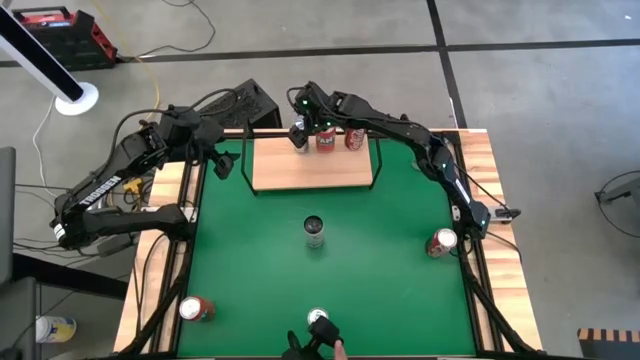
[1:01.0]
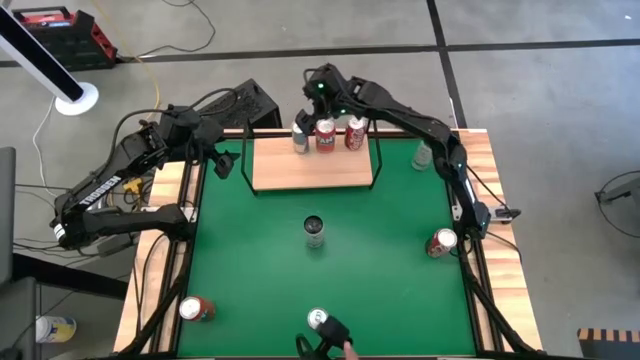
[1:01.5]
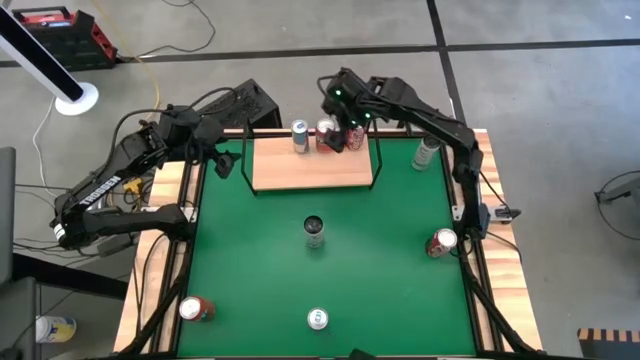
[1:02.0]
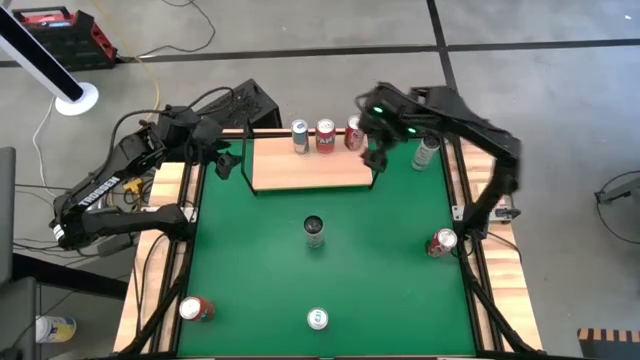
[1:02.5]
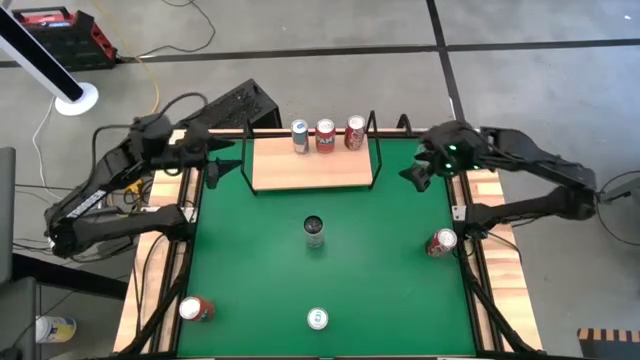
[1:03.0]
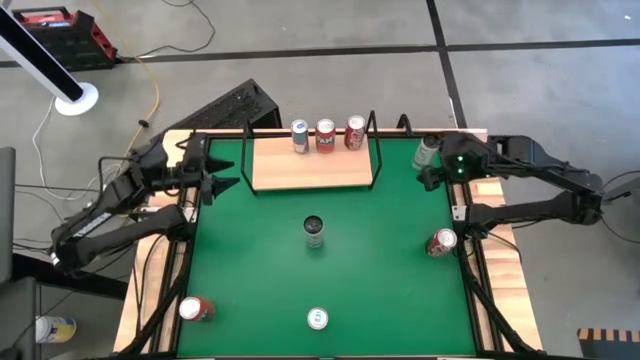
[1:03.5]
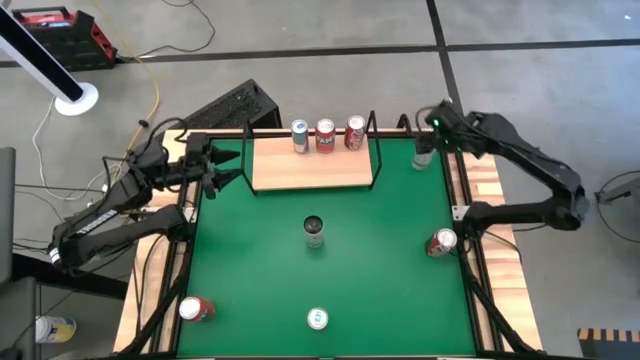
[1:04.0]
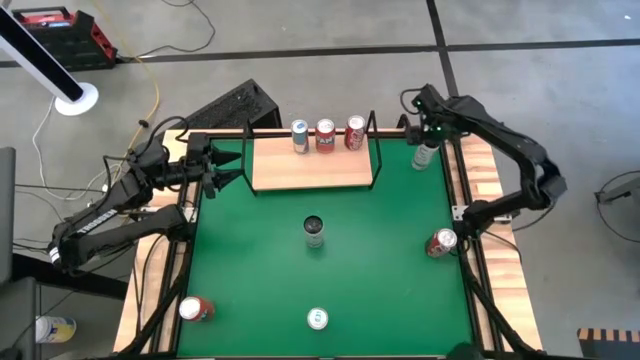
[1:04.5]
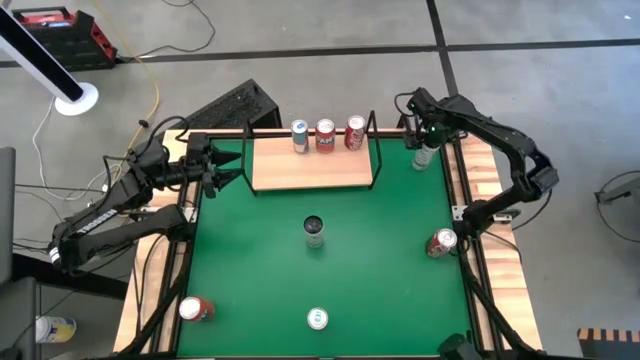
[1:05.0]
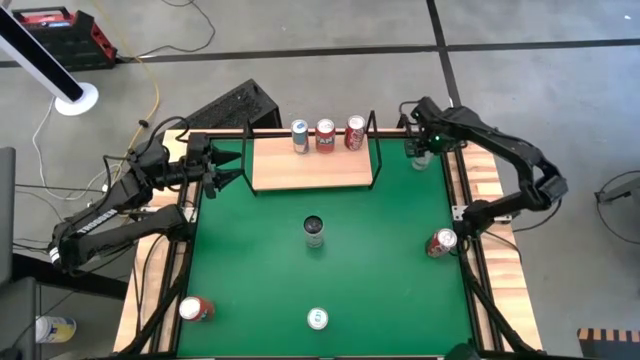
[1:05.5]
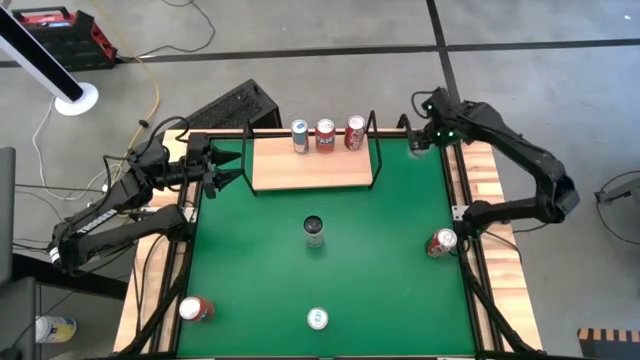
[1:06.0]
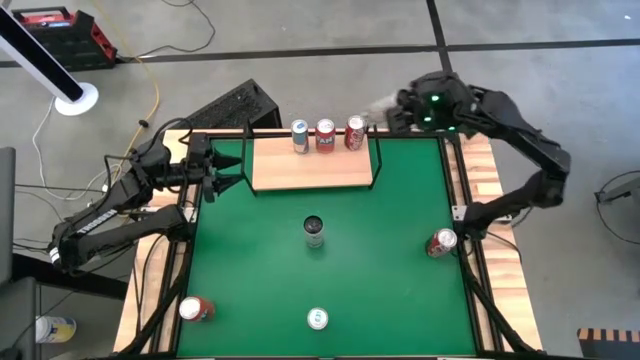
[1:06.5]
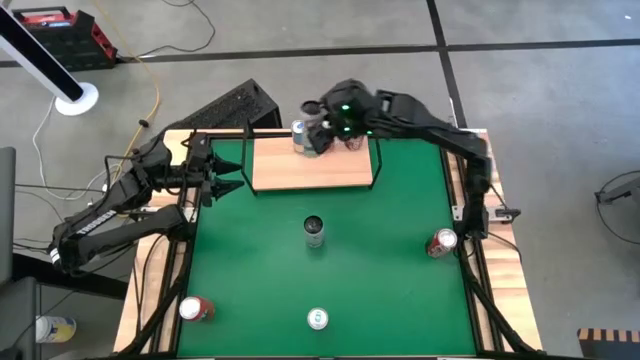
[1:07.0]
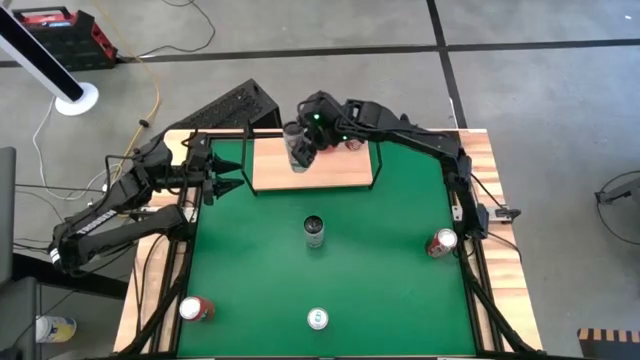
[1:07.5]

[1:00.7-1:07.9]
Task: Place canned beverage on shelf
Put the top white soda can on the shelf

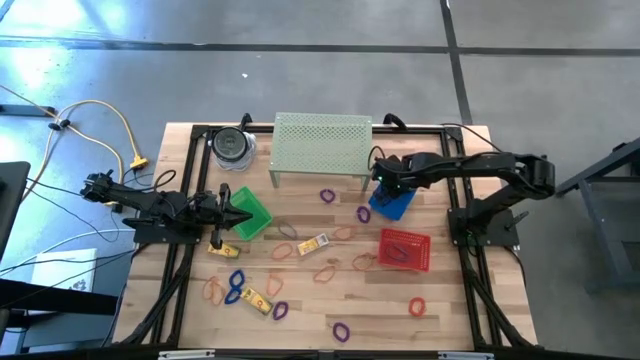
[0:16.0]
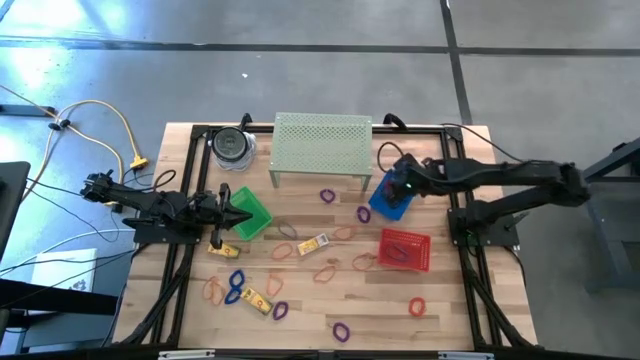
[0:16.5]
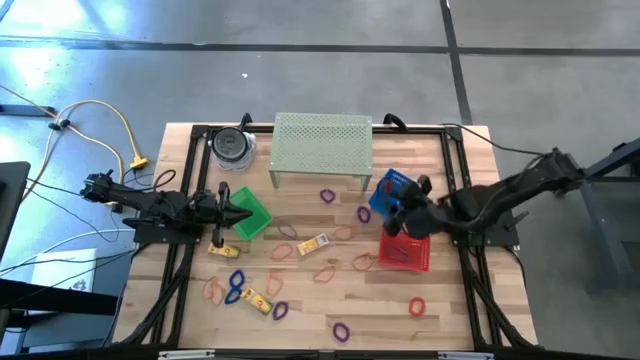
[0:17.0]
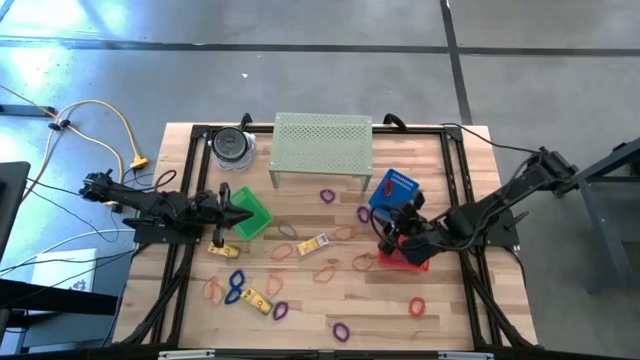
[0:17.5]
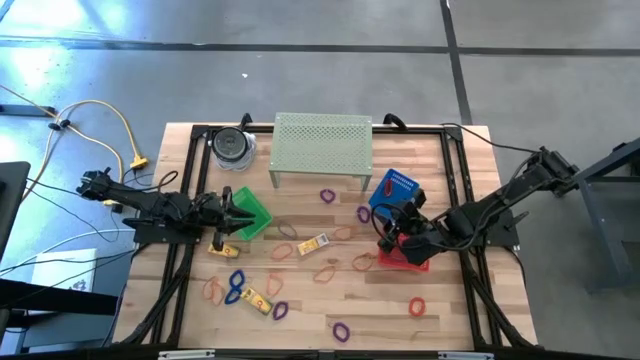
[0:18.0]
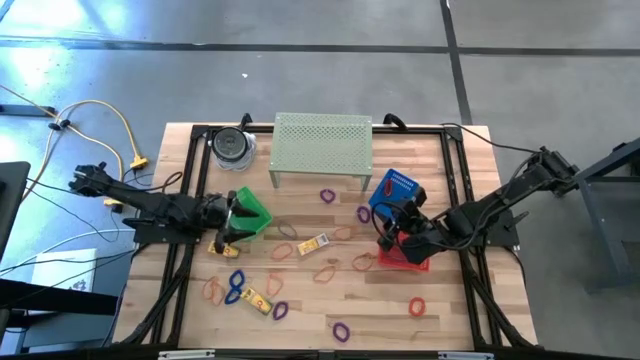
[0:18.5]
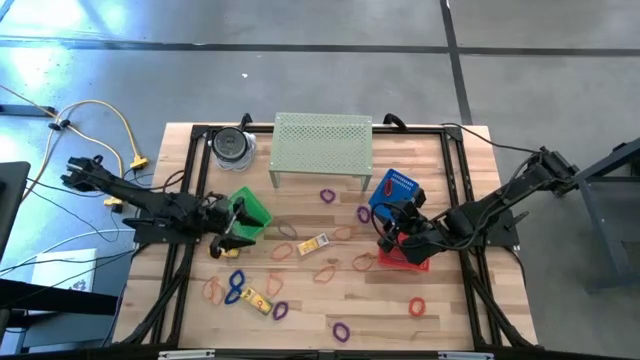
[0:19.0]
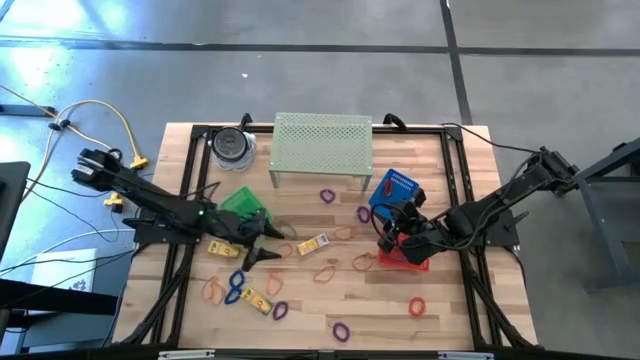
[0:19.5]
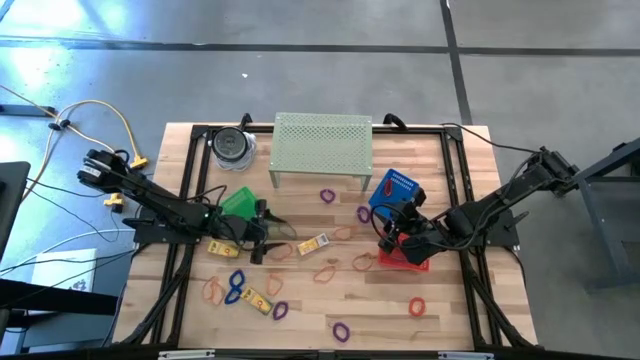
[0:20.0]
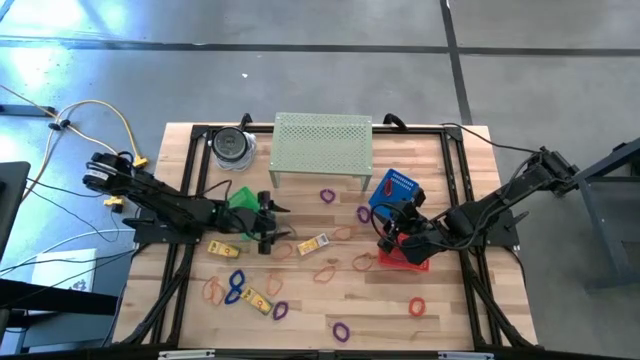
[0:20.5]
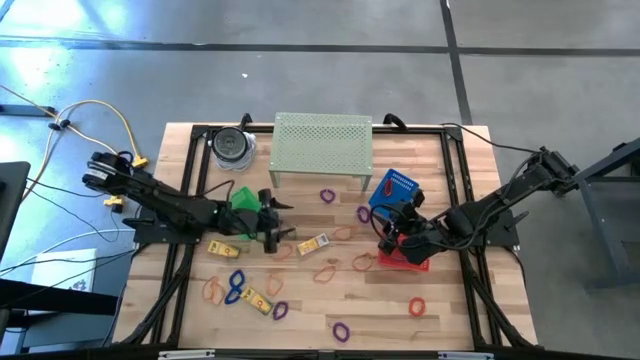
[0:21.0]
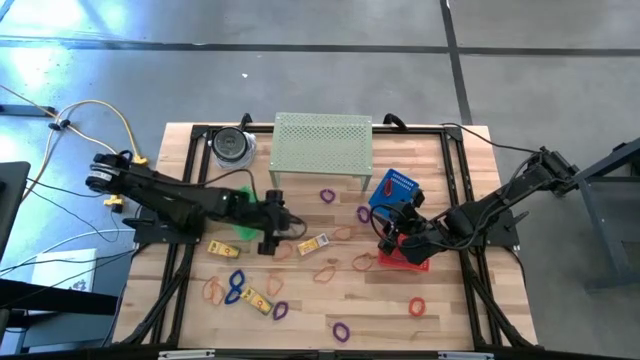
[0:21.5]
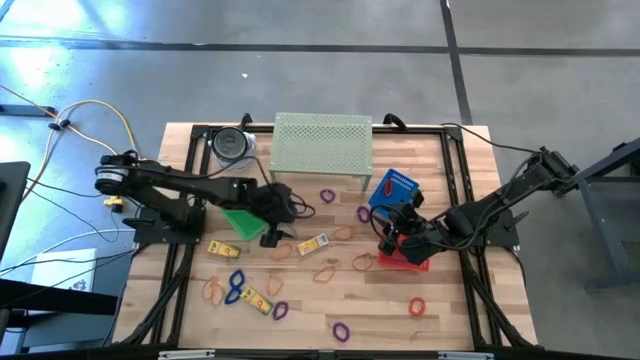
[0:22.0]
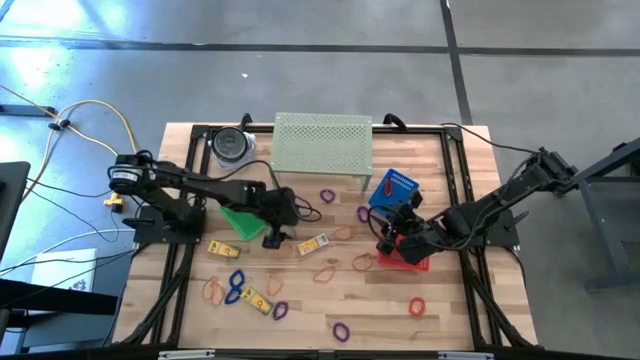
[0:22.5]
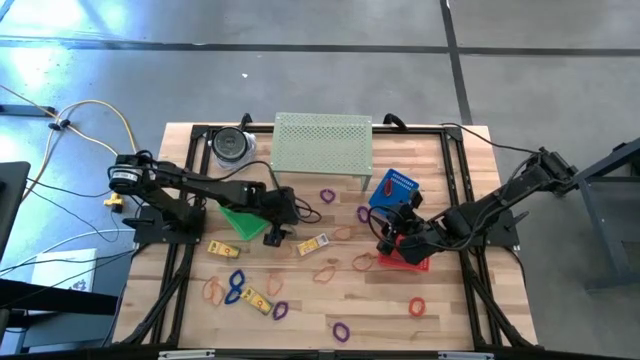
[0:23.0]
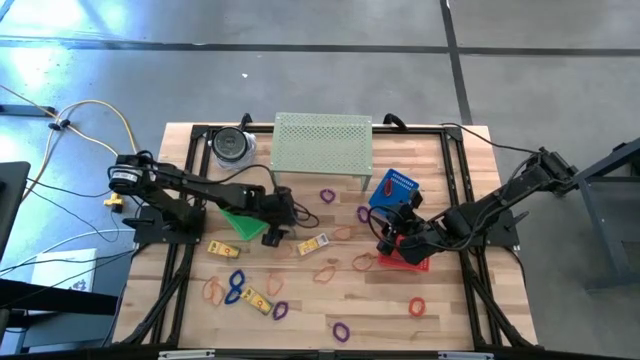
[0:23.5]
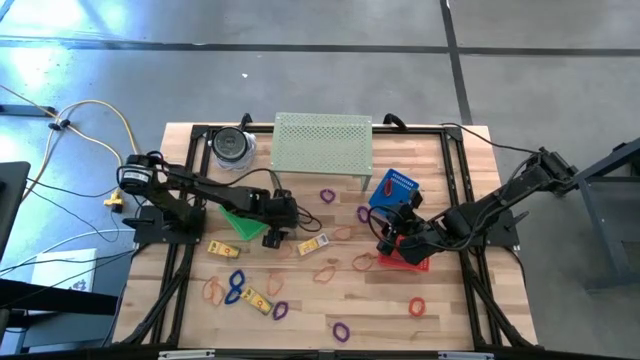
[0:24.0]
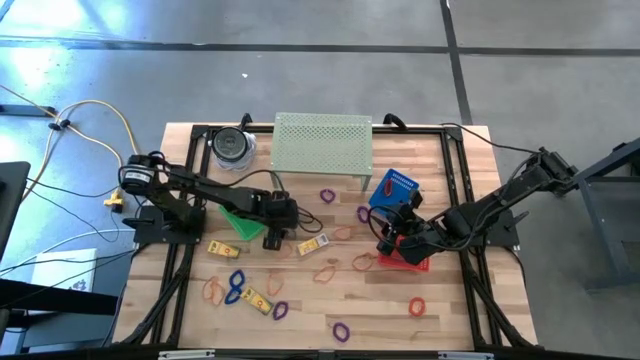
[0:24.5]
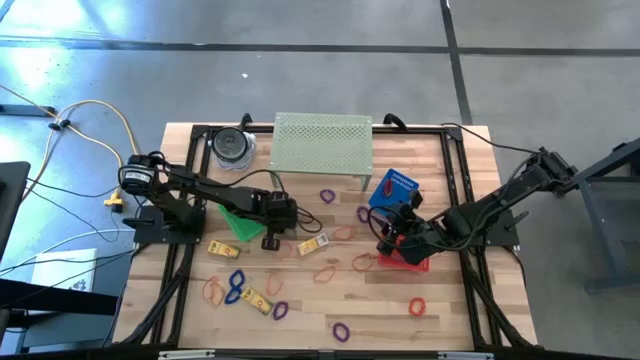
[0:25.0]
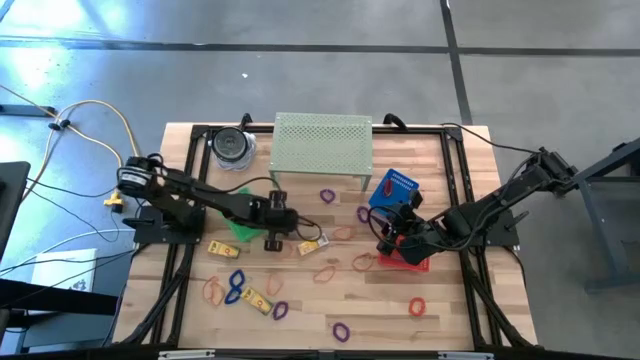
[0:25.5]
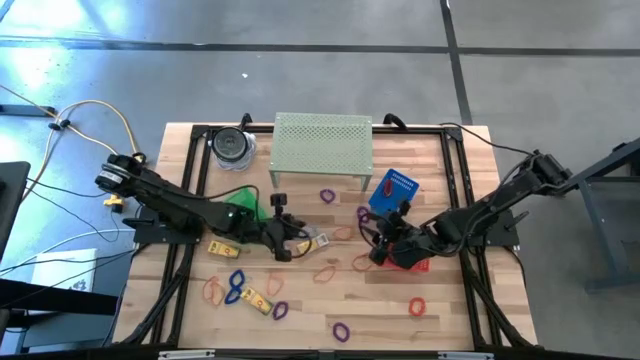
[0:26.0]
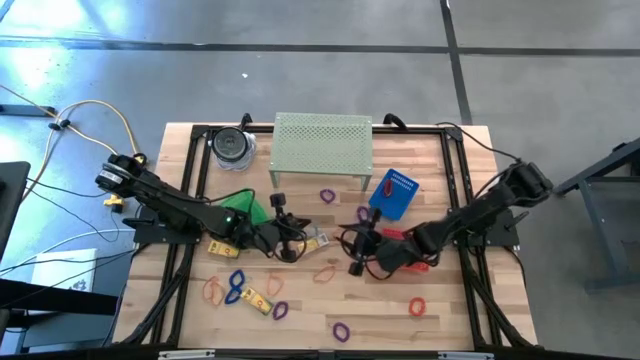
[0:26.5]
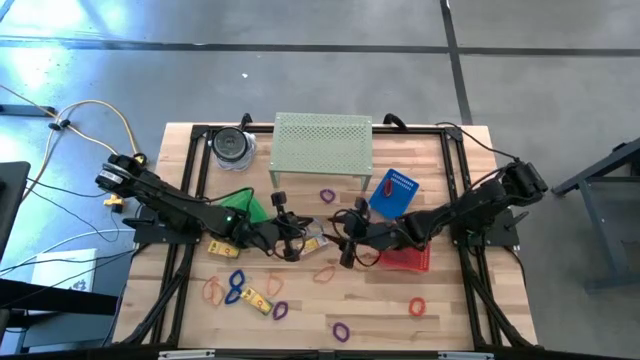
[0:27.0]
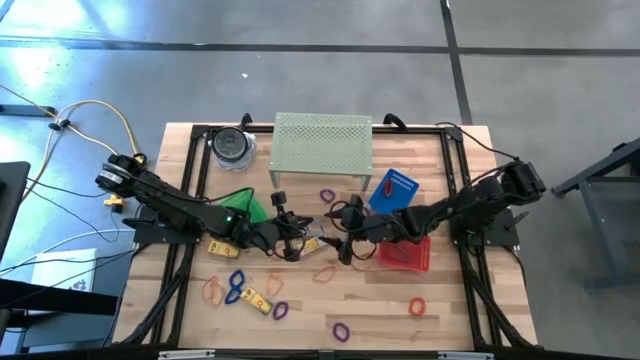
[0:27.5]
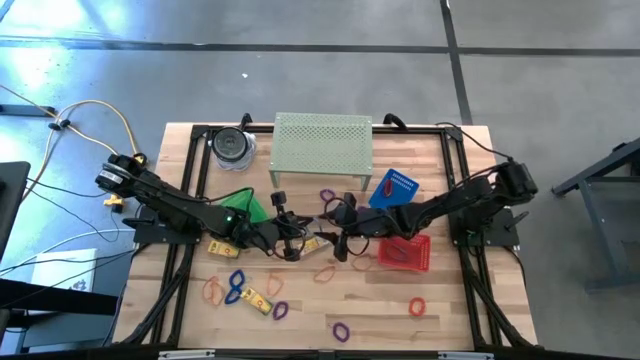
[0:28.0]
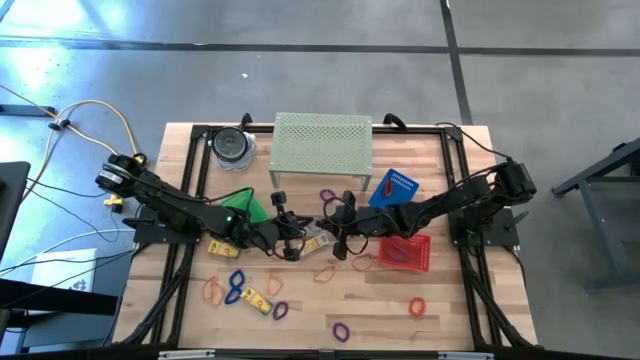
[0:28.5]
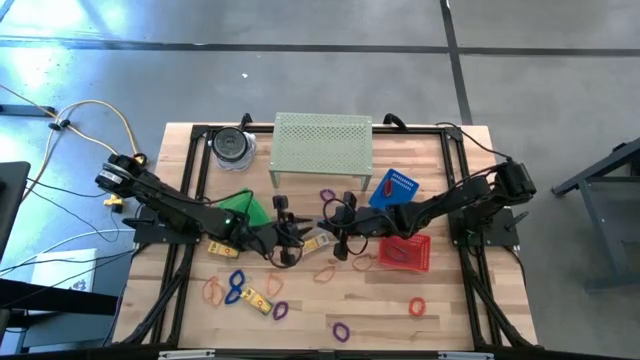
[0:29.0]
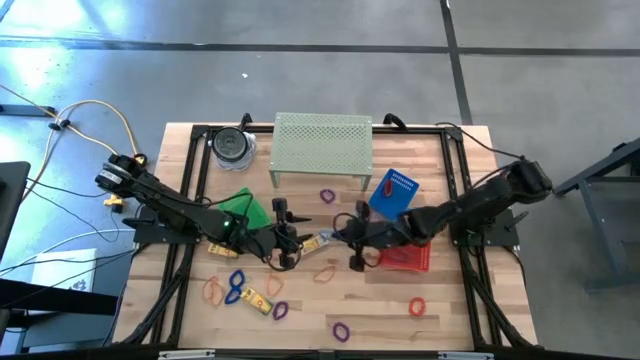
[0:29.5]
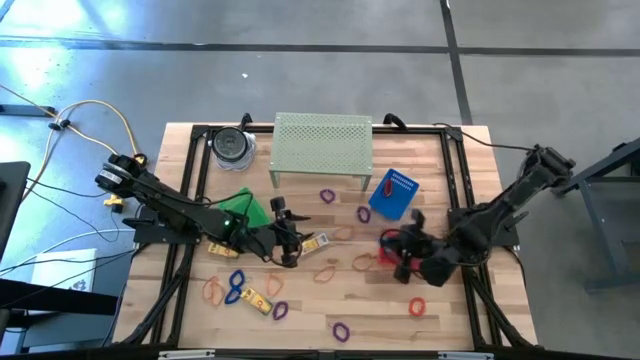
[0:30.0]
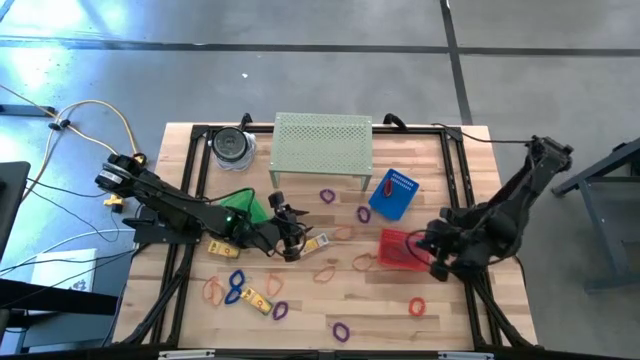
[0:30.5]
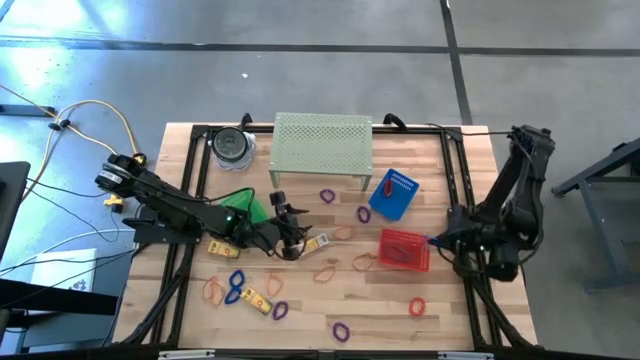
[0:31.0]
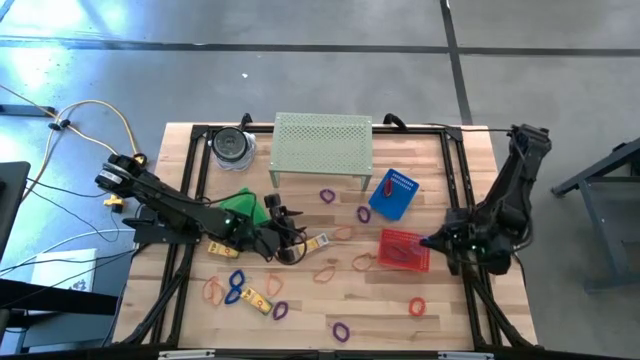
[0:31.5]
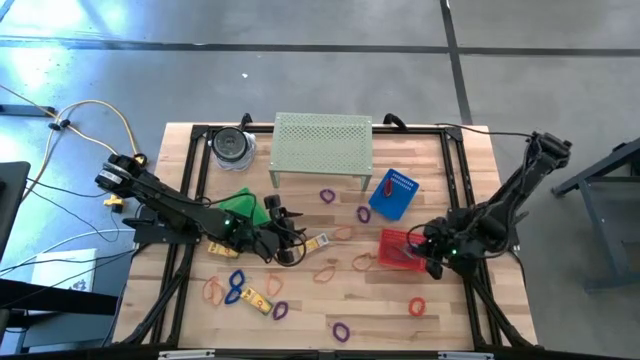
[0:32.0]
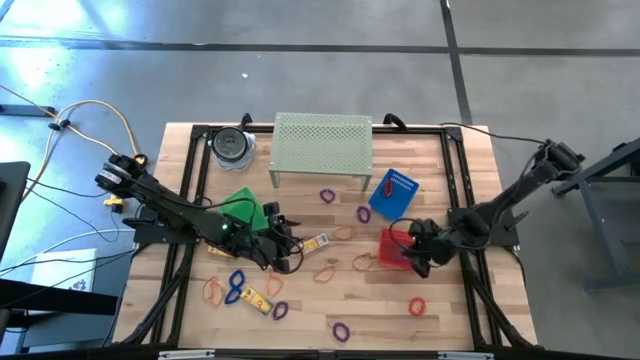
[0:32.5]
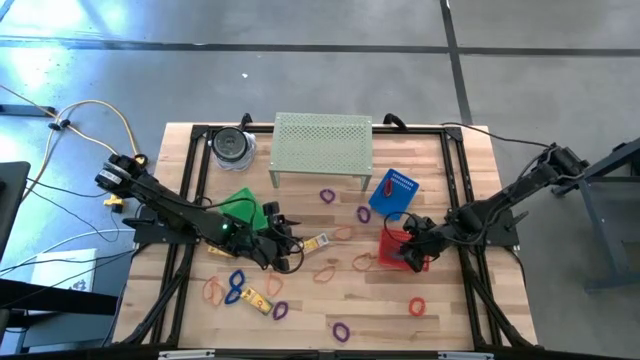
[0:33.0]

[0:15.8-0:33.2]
Task: Pick & Place Office Desk Supplies
Put the blue rubberband into the red basket
